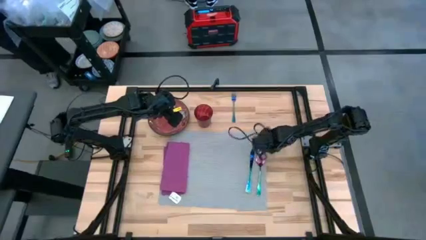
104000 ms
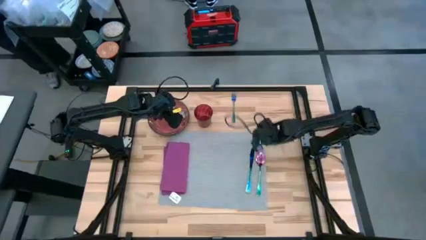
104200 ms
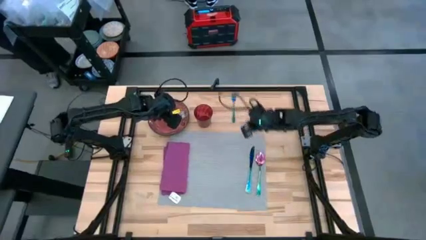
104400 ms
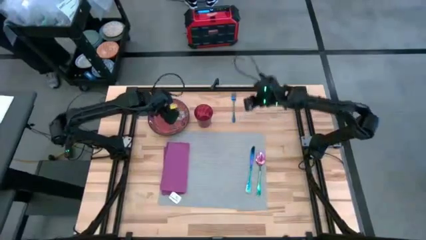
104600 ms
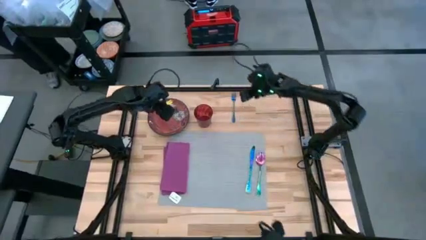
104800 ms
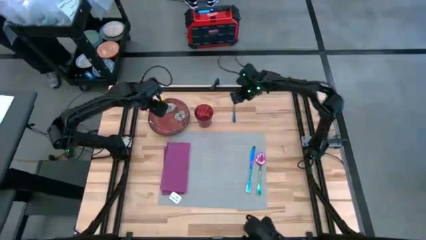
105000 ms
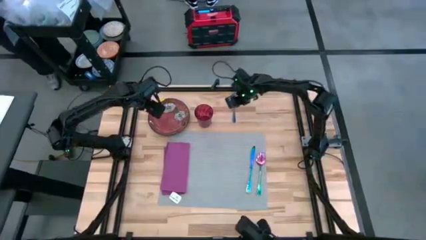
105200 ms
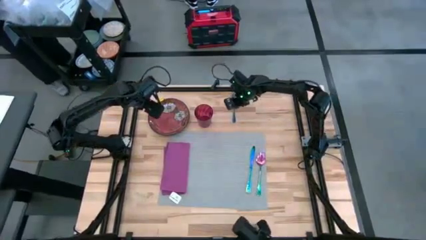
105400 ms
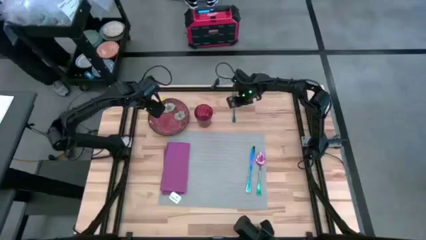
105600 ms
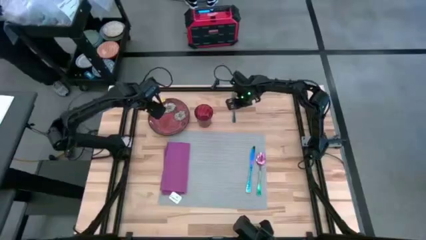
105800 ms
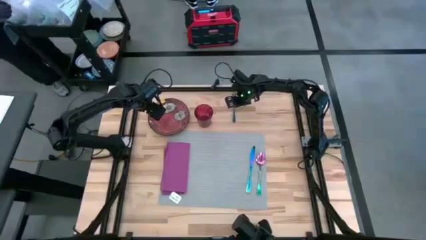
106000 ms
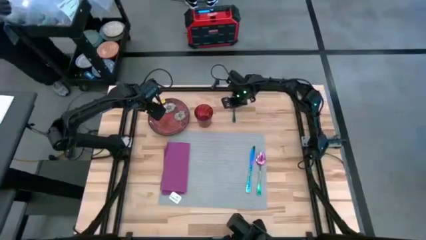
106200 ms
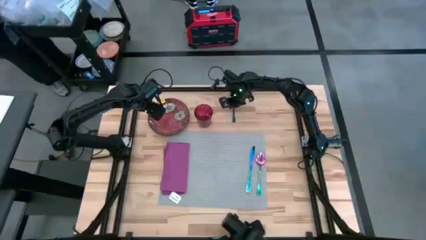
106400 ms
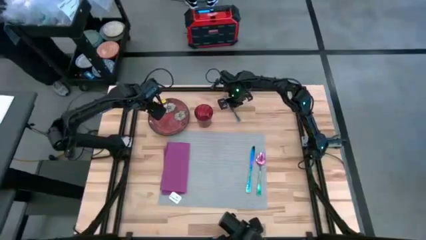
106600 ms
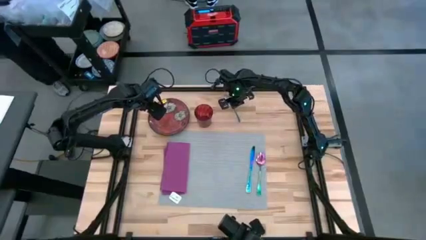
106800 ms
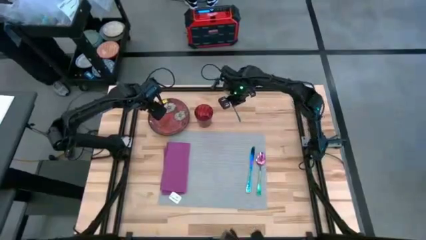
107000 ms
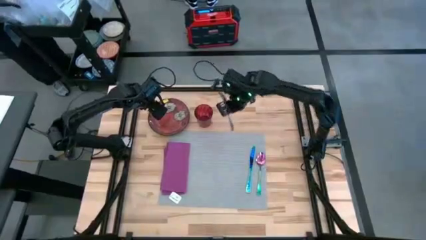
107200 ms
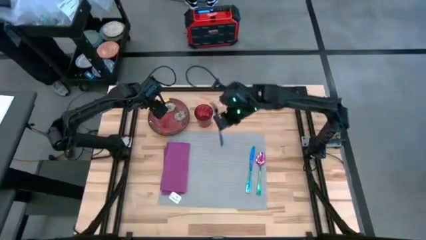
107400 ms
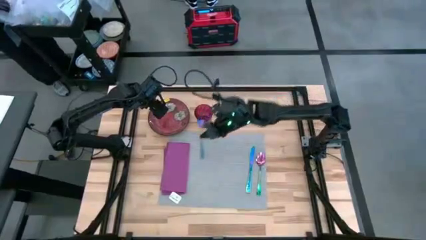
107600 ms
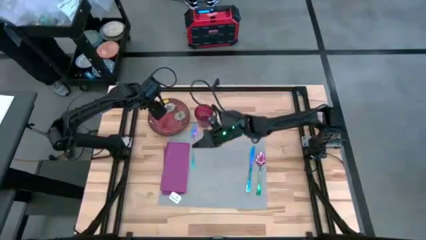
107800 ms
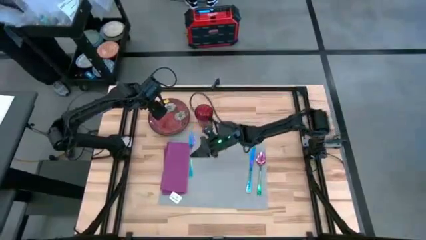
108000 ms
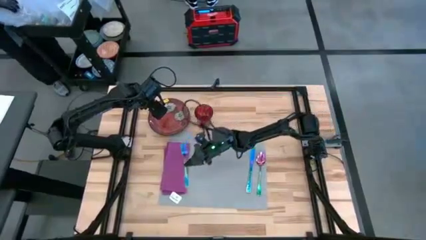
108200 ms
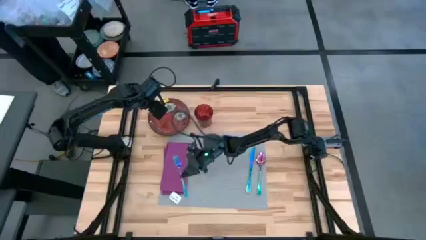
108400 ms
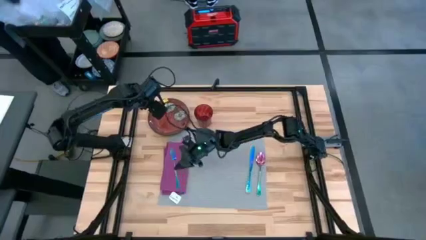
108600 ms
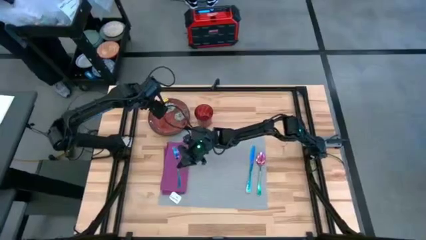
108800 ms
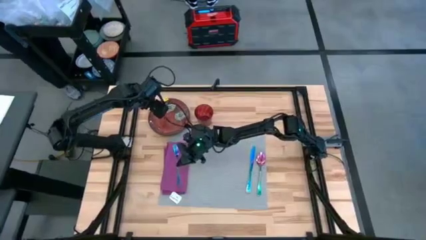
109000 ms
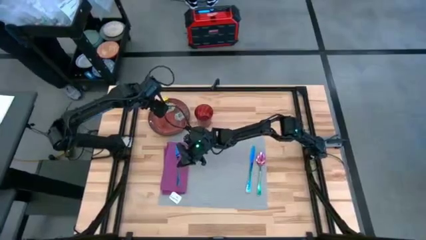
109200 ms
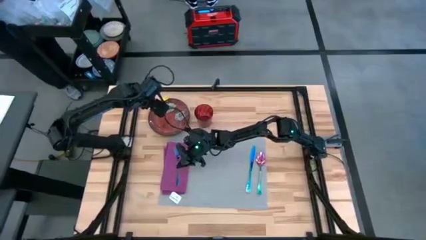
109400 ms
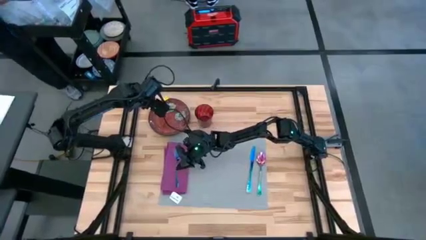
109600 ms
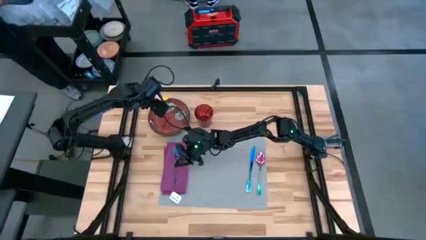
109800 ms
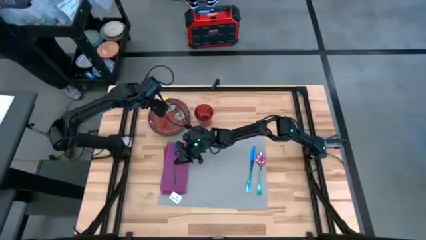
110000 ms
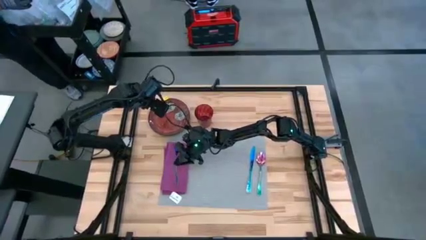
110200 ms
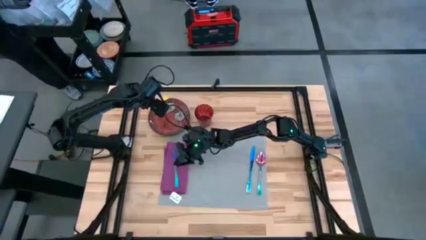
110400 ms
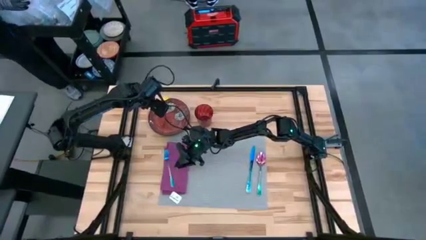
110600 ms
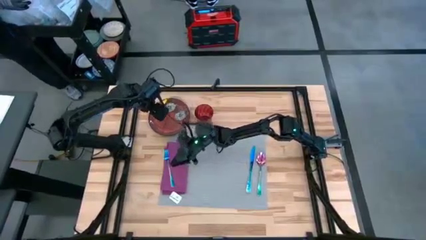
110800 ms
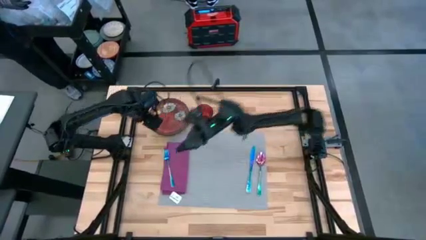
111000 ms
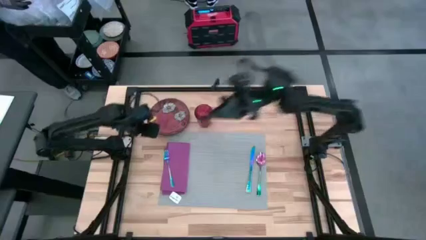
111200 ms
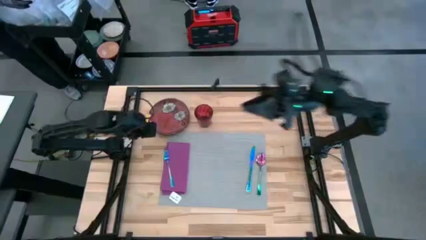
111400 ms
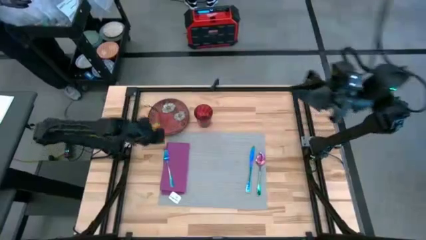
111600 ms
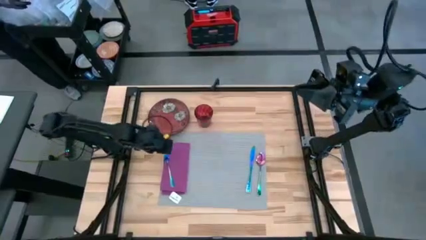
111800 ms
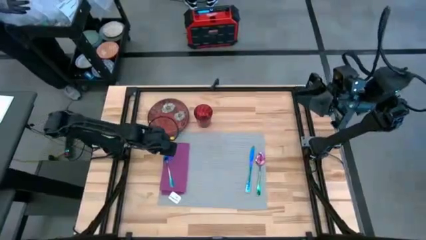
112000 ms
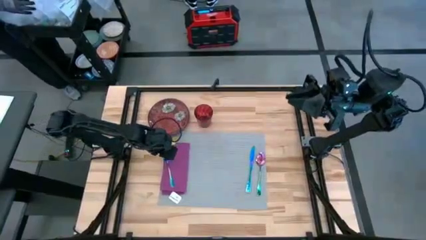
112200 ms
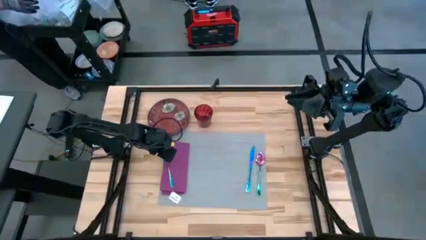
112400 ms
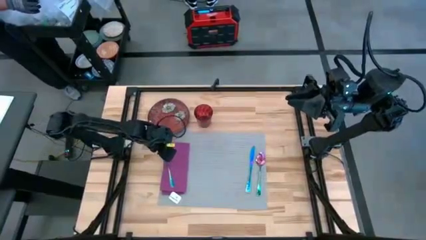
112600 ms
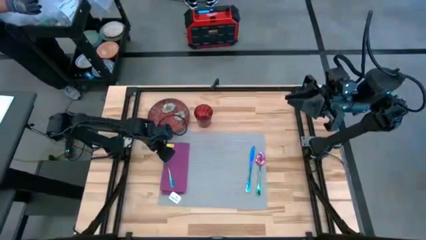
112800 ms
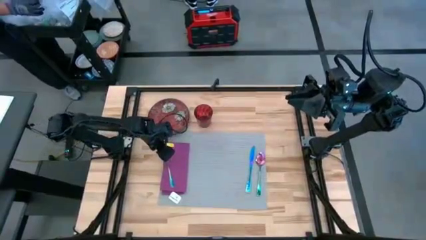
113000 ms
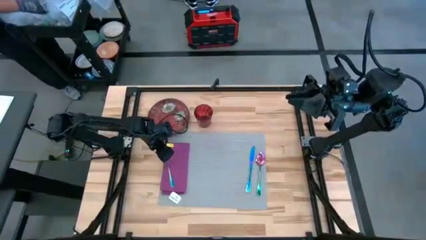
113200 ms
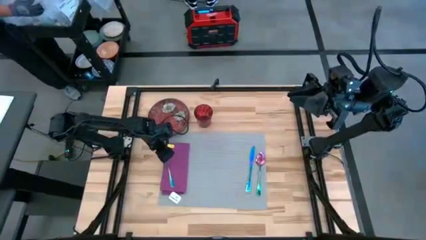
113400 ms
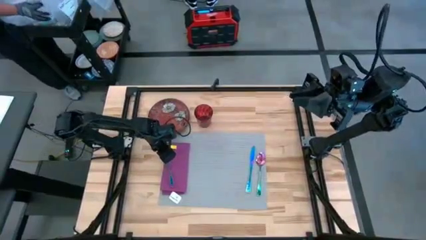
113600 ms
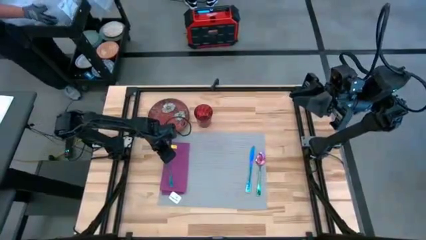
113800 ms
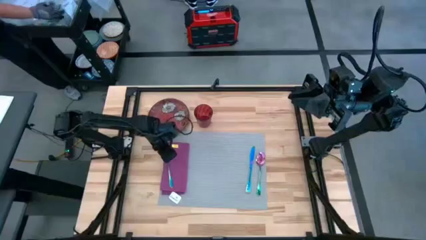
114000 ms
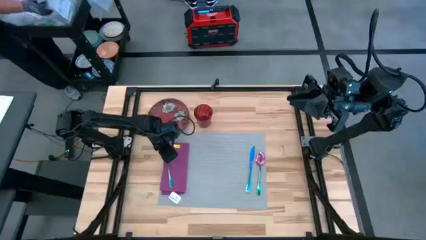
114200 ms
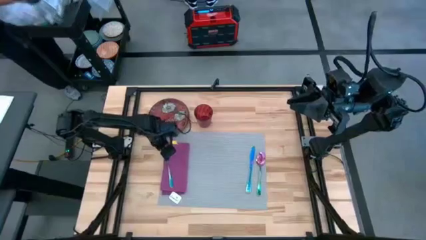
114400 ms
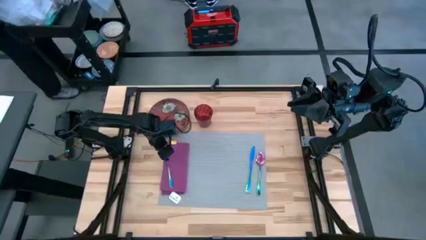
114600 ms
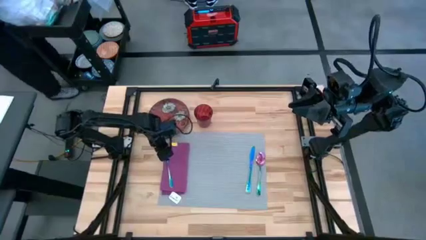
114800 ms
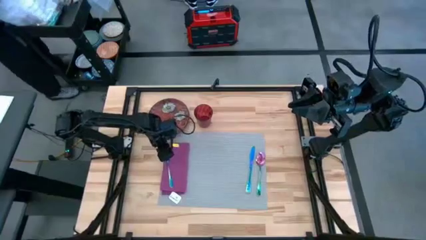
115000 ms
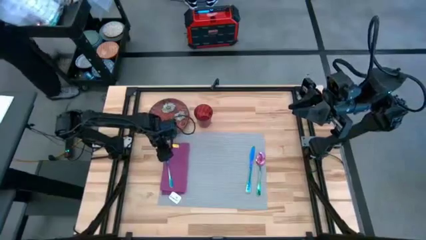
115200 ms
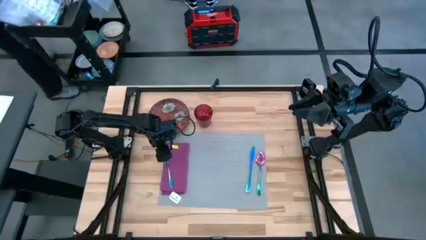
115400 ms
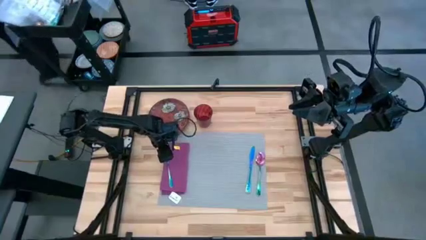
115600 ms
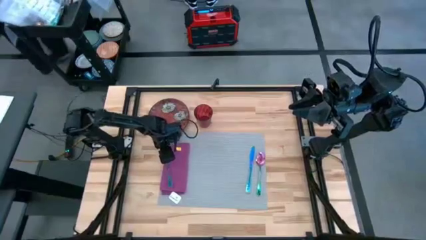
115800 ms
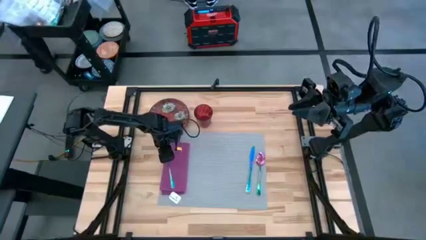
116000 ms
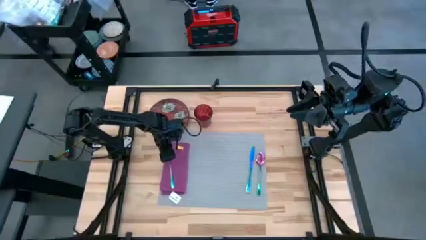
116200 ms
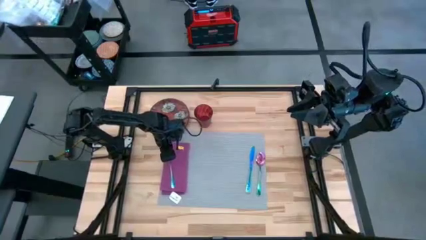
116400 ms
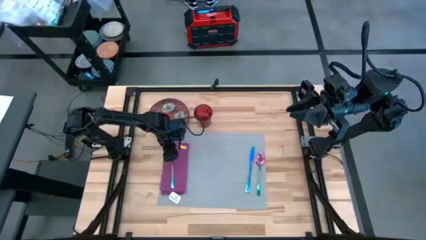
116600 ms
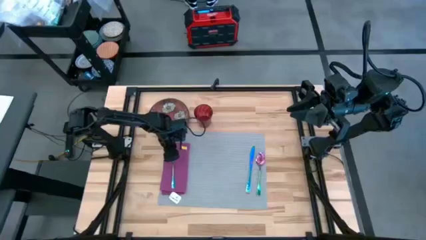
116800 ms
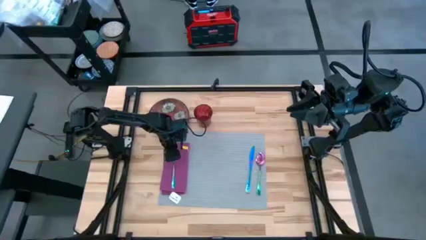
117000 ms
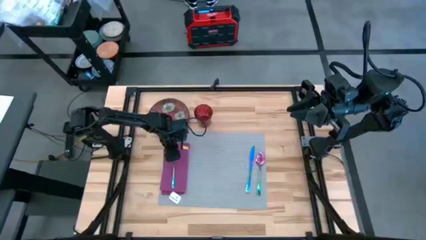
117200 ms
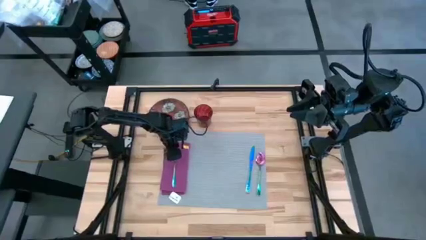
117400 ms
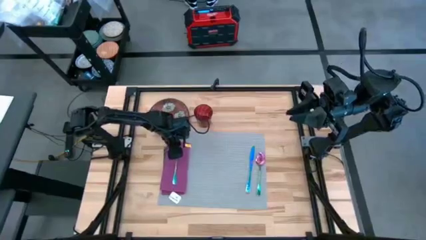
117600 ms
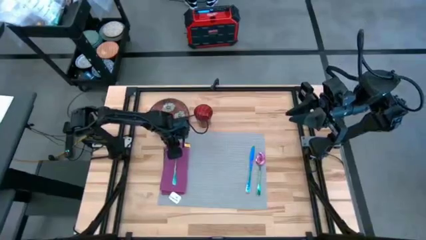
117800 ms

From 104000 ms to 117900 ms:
Task: Set table place
Put the blue fork on top of the purple napkin

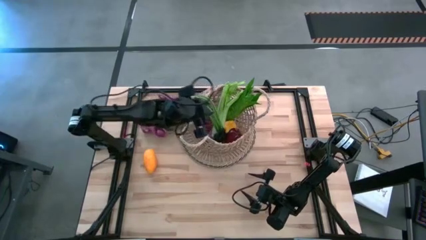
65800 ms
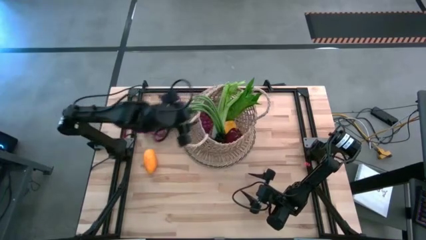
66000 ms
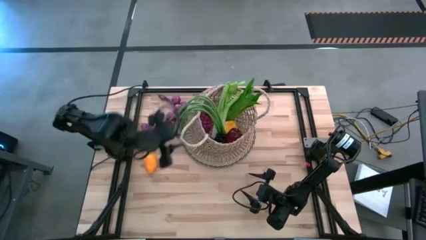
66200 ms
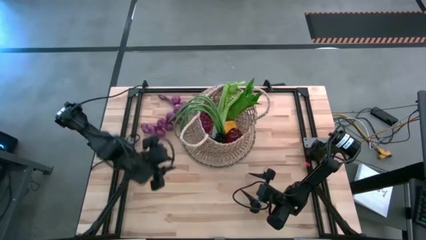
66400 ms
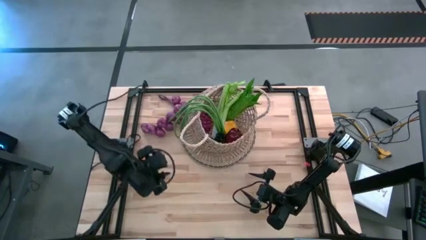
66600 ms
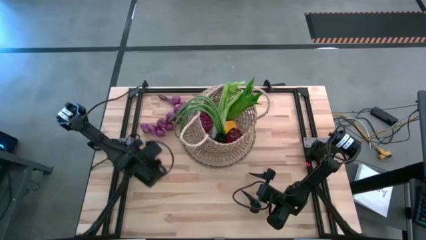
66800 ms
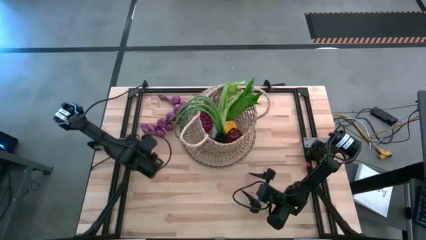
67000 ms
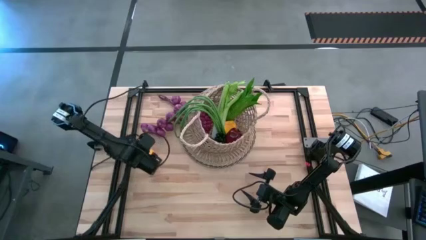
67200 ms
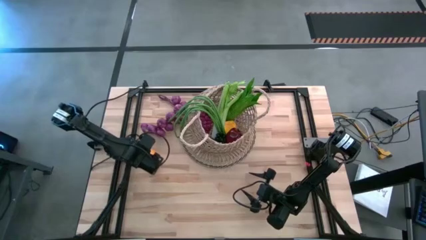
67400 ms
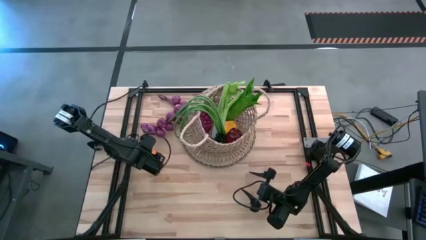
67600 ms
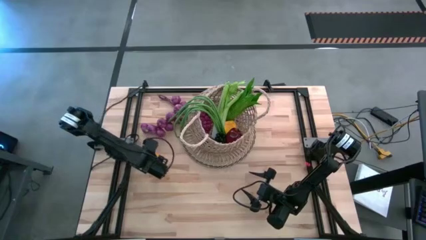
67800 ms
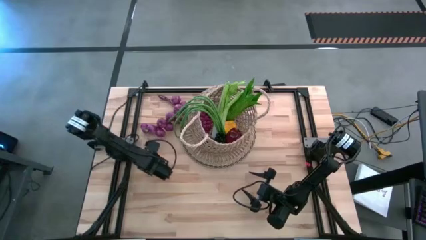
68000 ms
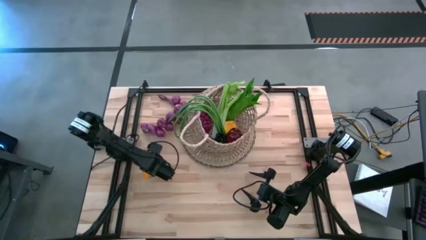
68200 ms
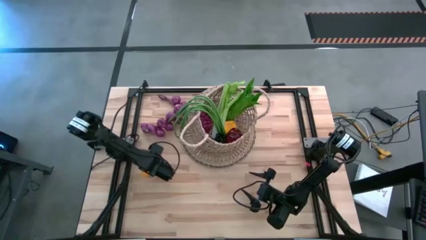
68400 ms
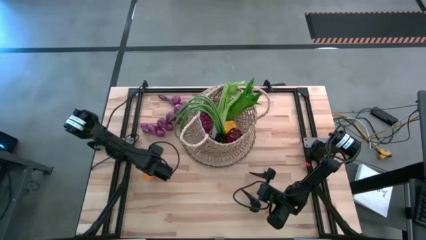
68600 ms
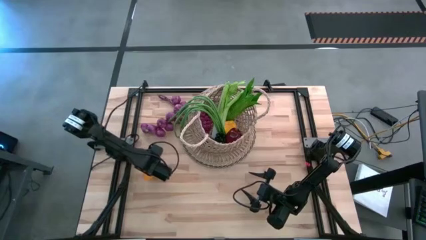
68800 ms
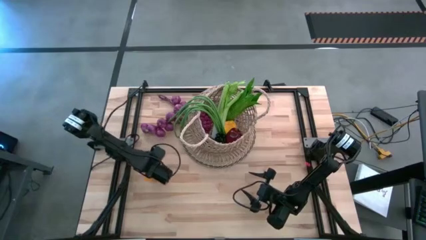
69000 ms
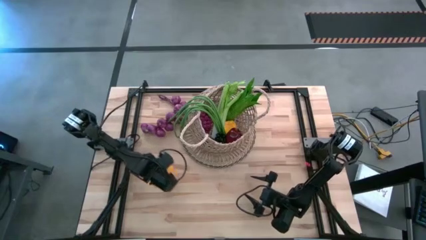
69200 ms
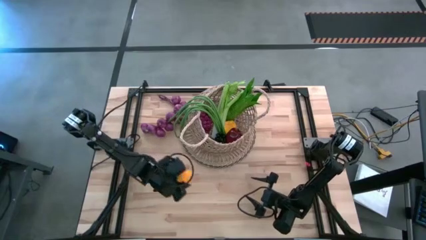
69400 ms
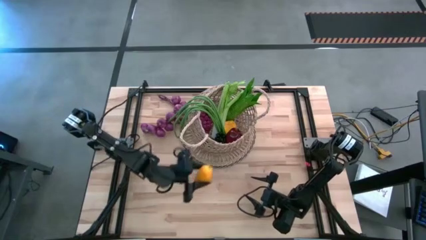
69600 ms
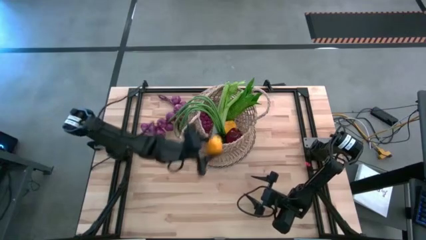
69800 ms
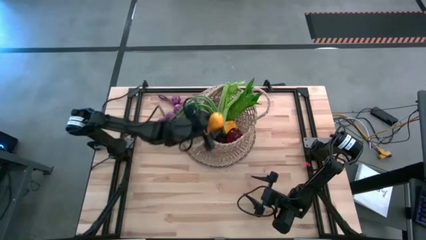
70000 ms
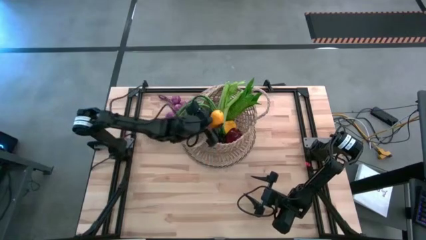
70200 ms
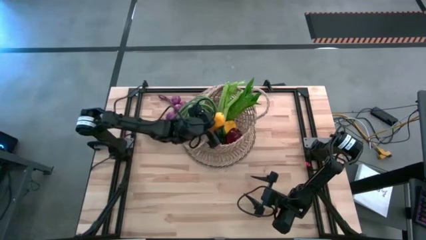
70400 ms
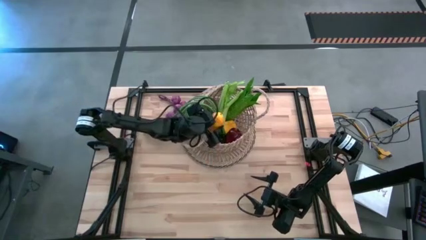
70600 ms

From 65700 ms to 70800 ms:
Task: Build produce basket
Put the mango into the basket
